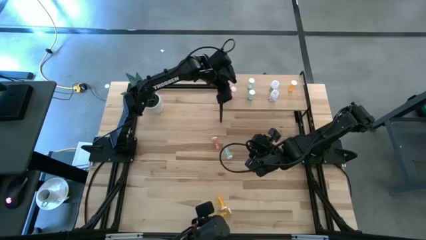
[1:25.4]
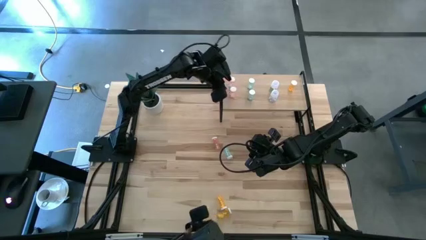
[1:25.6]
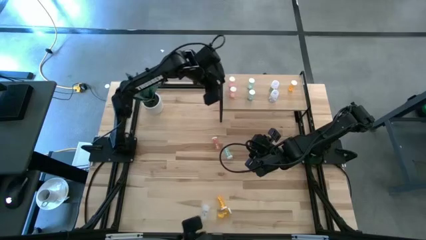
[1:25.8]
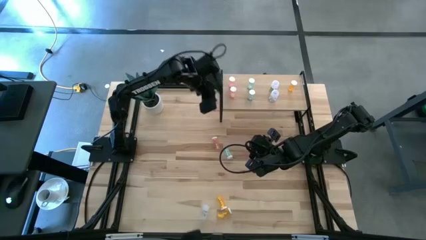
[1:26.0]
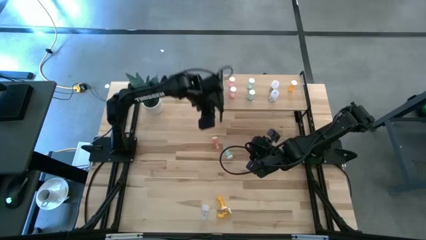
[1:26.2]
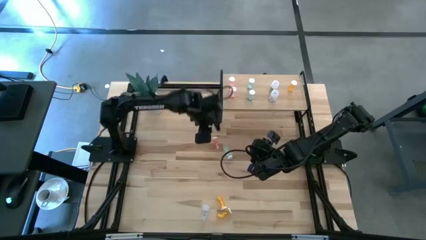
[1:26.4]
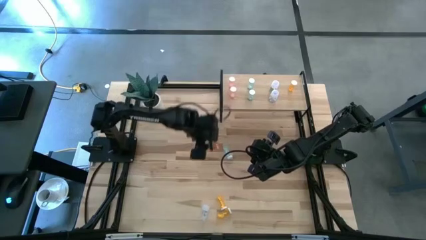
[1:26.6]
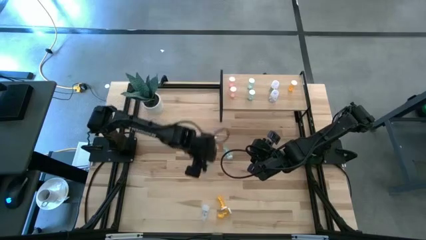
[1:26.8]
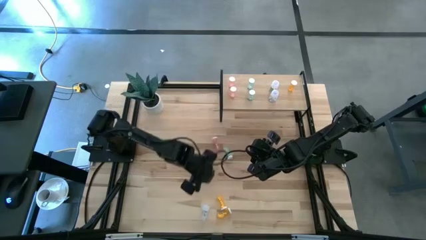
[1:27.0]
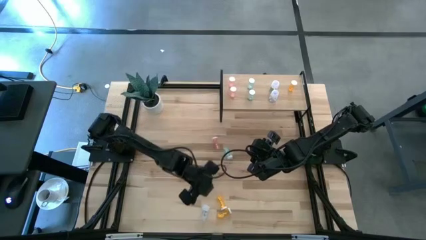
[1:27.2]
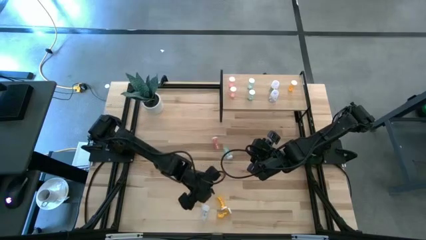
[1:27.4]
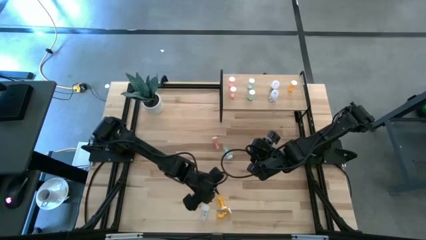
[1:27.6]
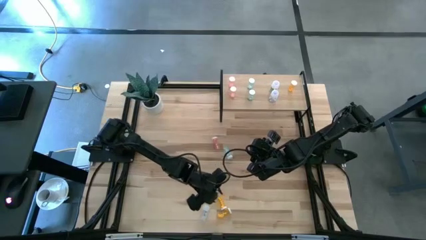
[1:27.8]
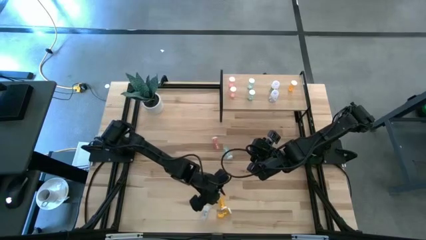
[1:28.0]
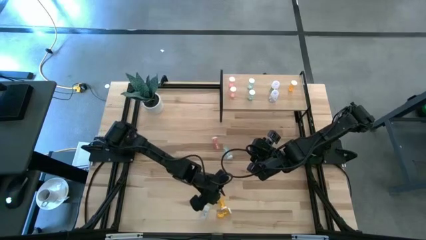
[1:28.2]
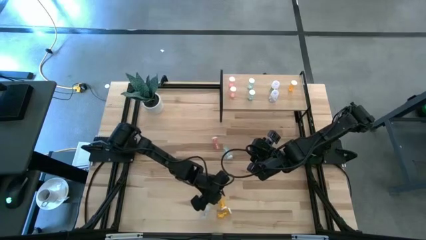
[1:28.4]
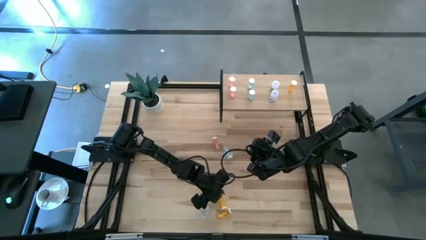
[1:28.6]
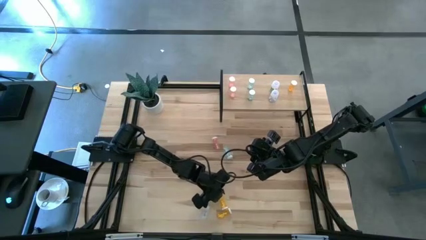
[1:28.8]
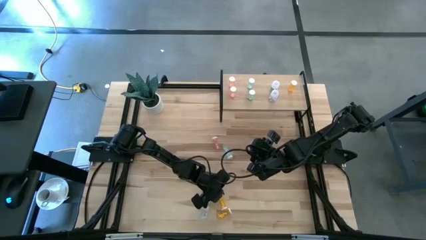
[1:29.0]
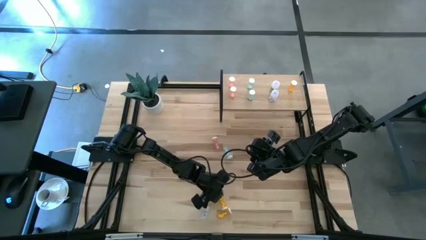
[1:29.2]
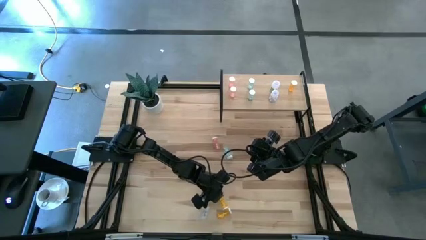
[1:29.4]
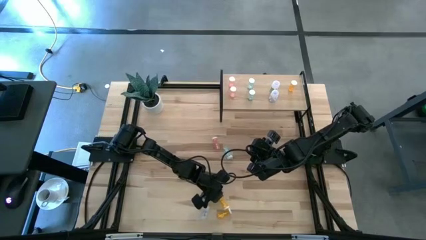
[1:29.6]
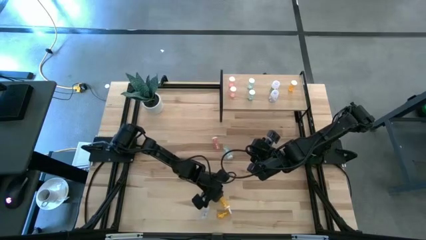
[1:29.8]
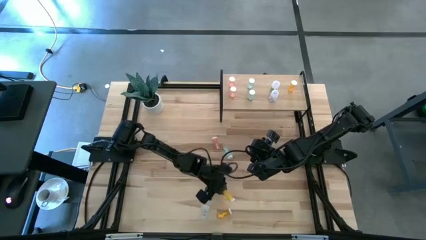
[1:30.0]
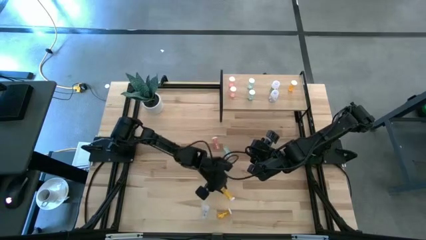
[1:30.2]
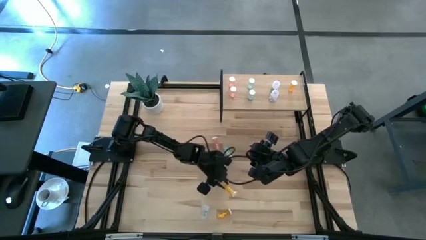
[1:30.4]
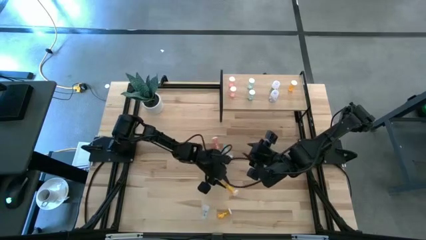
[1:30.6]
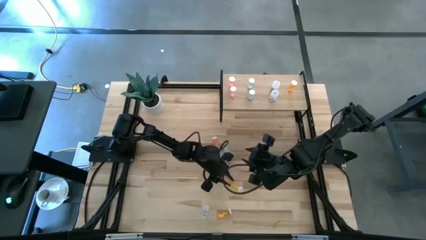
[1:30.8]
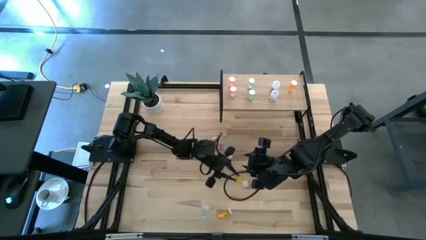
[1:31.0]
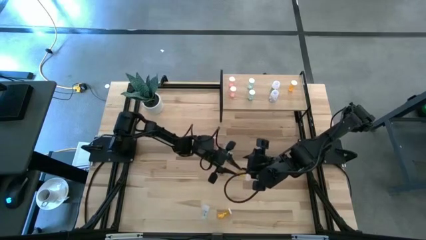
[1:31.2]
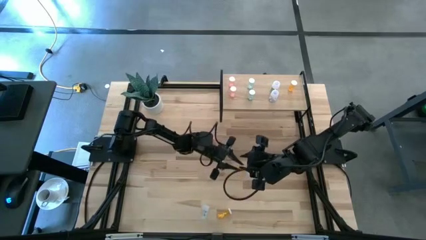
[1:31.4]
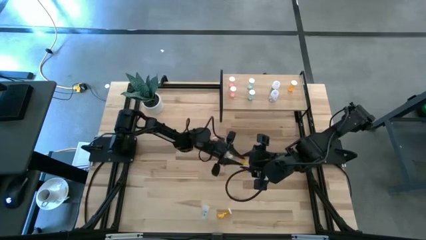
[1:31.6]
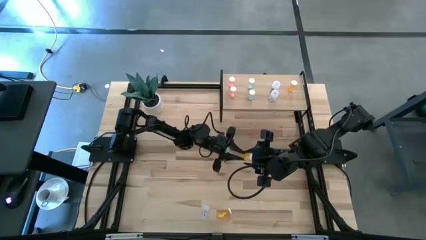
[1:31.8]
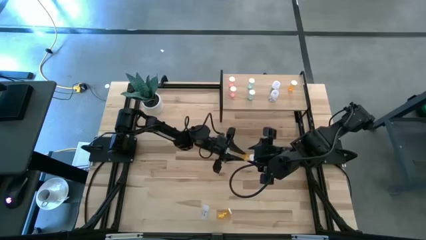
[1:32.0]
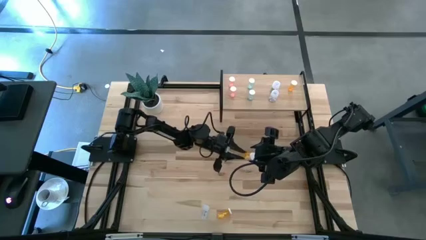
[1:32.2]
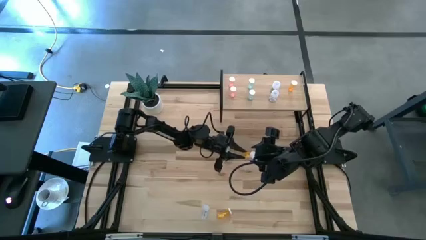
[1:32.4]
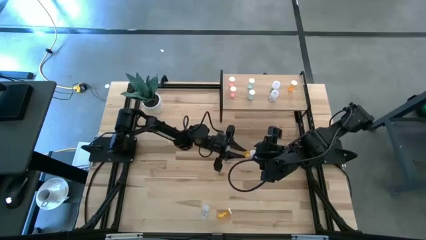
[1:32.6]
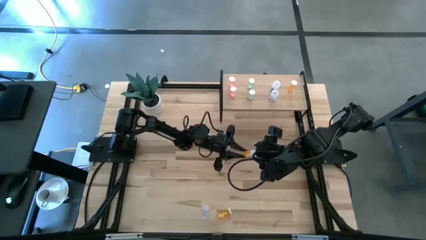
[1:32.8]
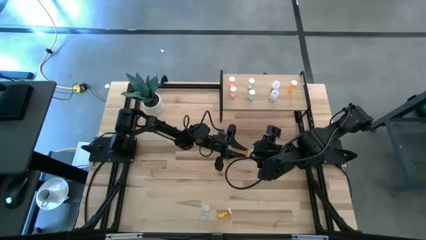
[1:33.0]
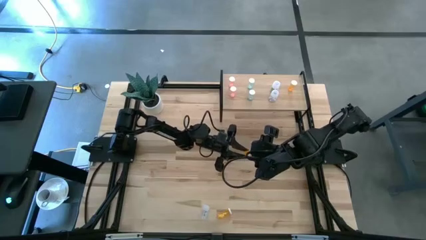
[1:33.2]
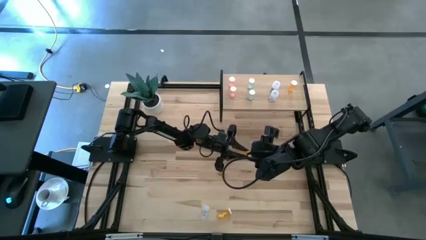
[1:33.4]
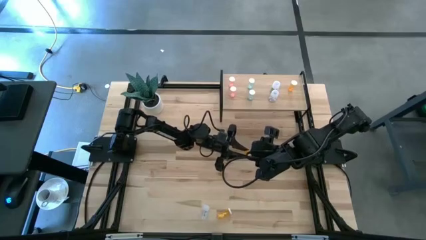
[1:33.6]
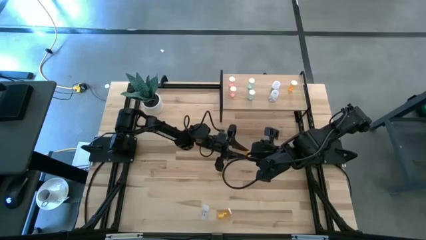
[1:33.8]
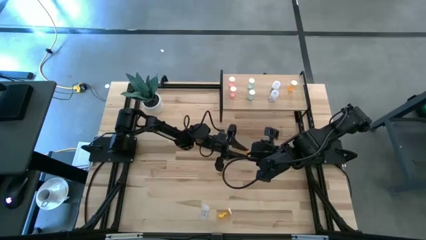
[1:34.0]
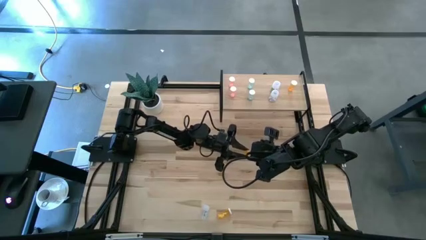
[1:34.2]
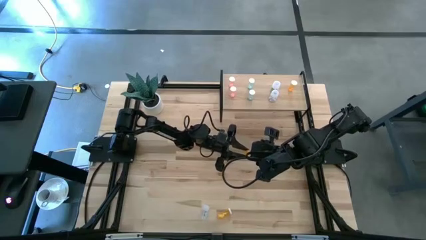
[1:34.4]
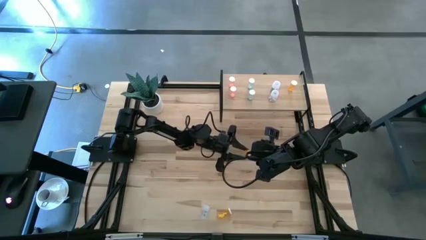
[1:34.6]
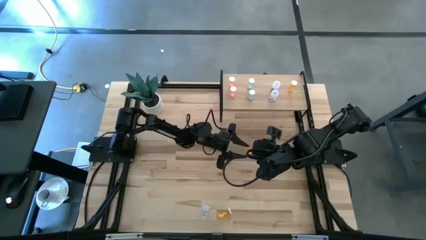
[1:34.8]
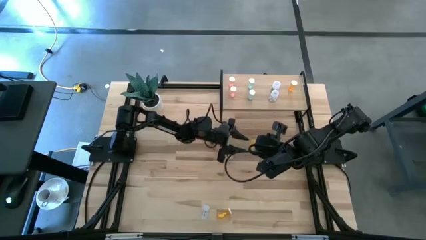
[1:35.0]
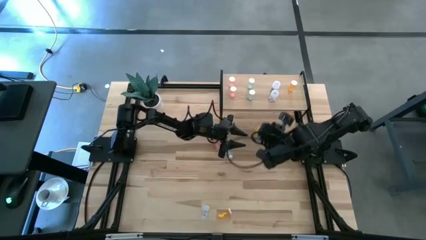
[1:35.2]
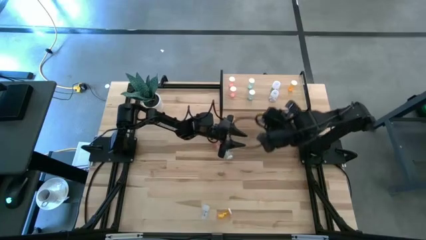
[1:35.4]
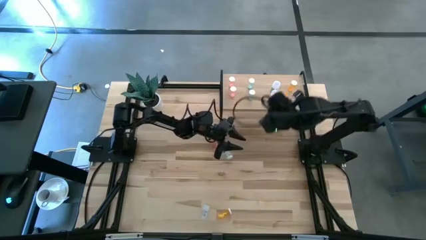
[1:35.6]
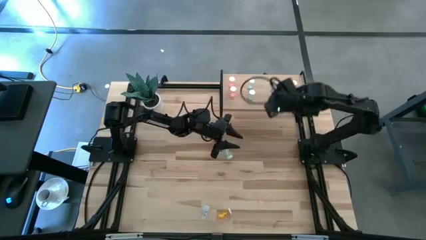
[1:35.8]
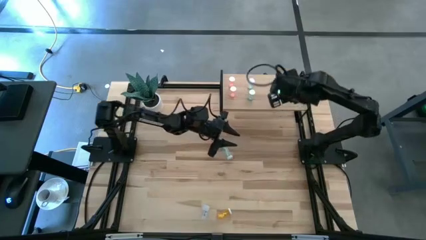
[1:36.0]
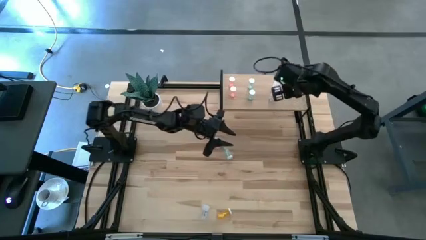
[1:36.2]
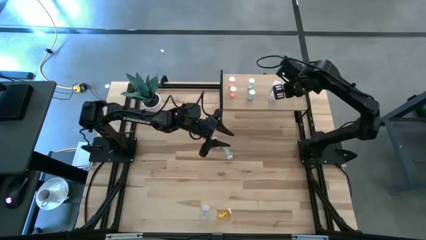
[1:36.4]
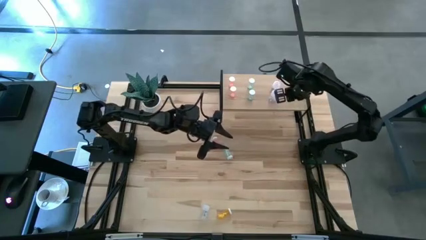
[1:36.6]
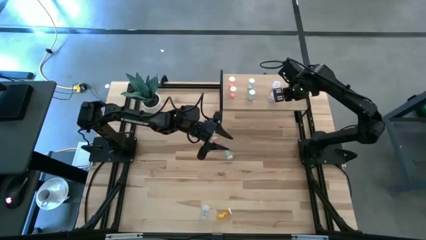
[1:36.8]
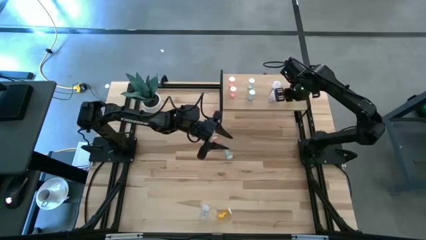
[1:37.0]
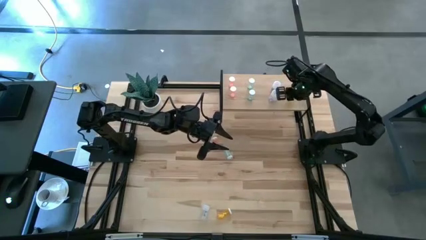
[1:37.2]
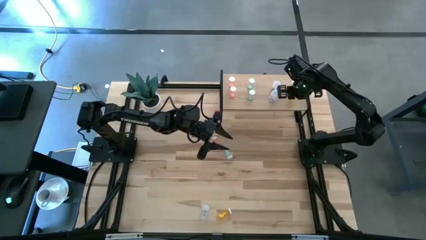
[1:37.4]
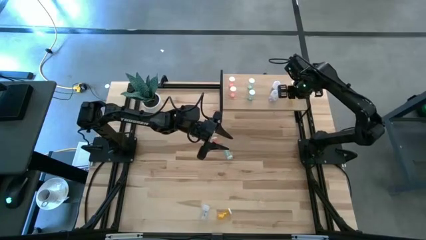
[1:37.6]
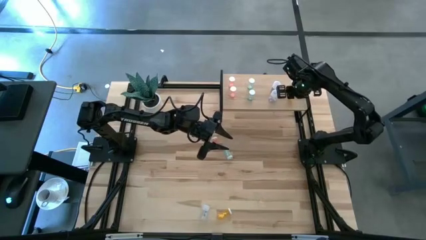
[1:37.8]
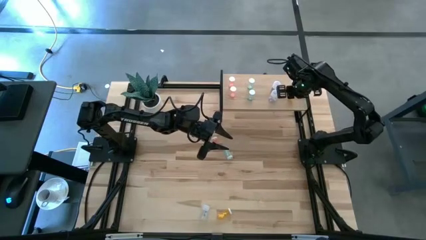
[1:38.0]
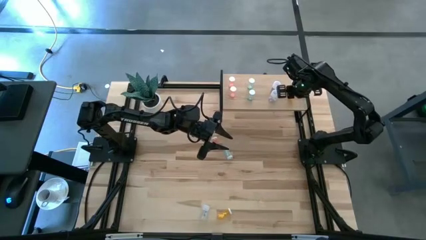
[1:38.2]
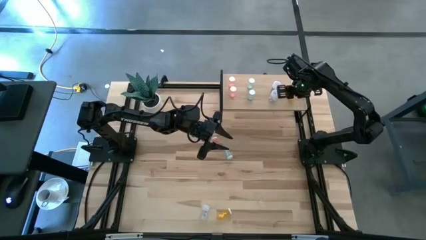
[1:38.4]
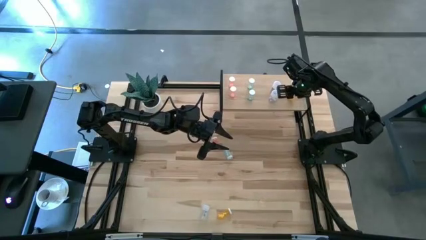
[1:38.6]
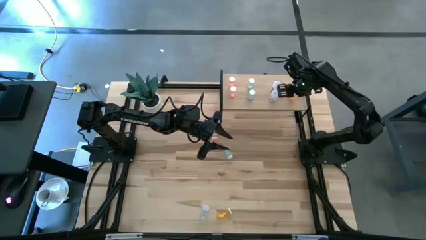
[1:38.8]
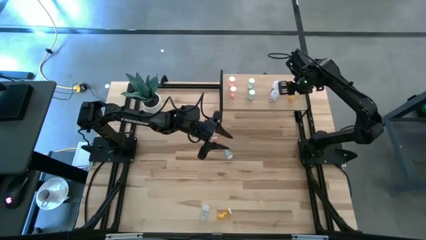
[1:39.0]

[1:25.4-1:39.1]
Task: Pick and place medicine bottles onto shelf by color
Put the top orange pill bottle on the shelf aligned with the other orange pill bottle
